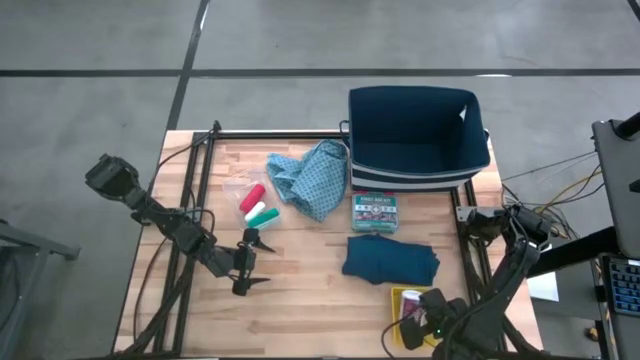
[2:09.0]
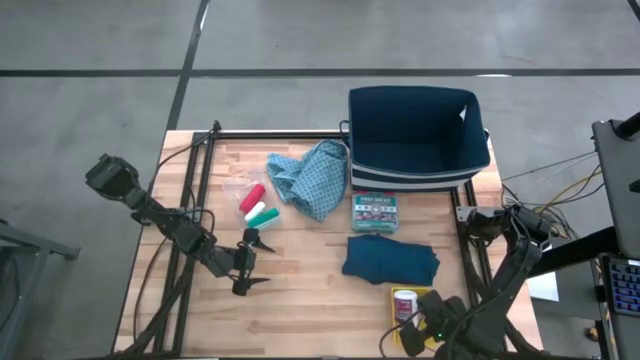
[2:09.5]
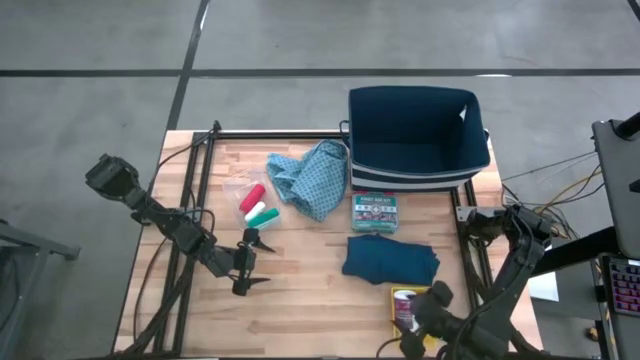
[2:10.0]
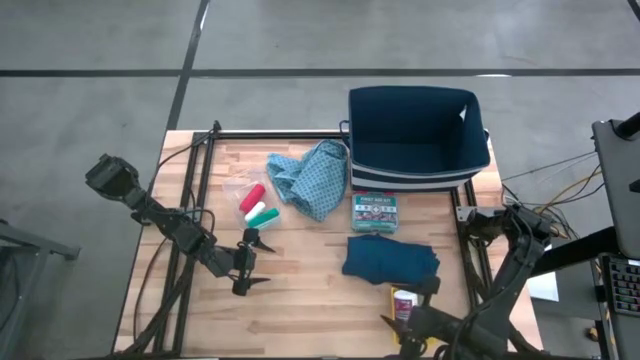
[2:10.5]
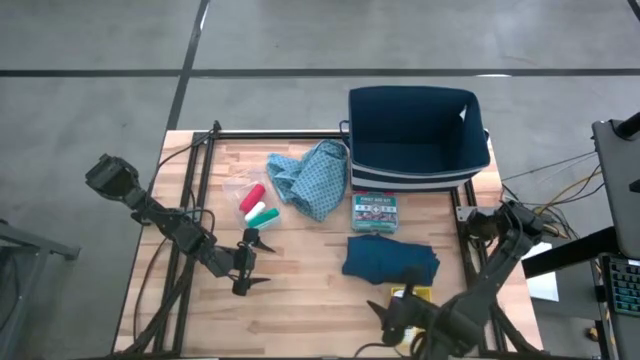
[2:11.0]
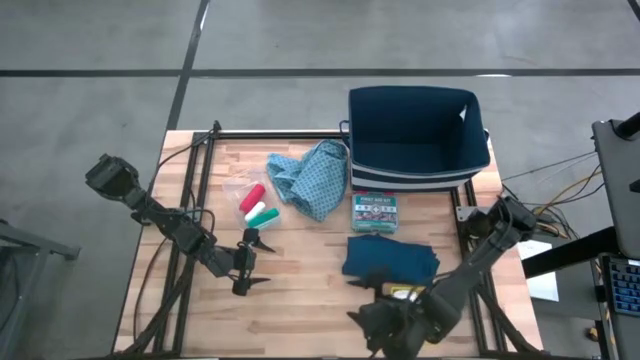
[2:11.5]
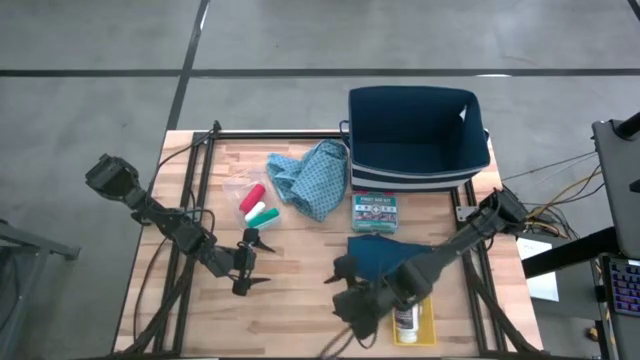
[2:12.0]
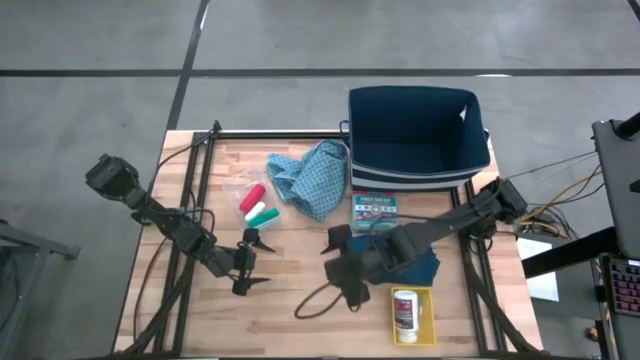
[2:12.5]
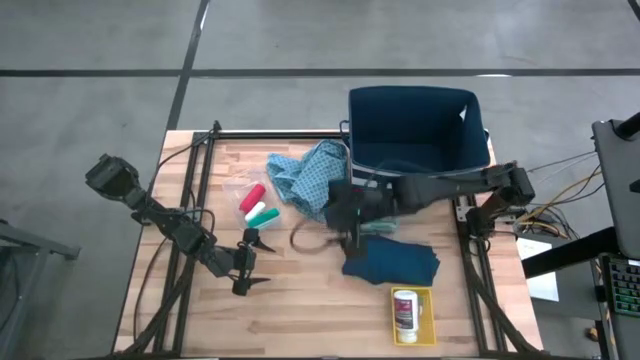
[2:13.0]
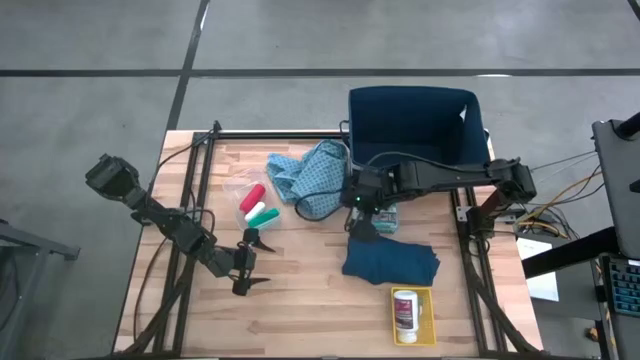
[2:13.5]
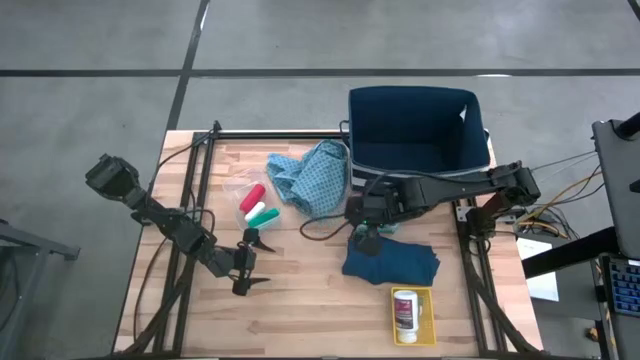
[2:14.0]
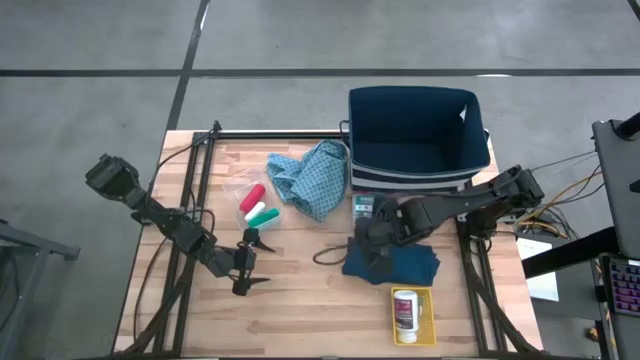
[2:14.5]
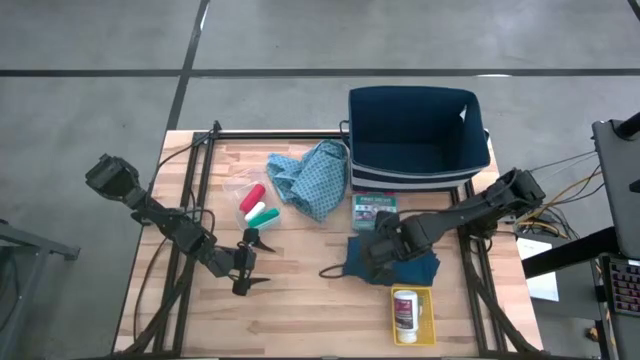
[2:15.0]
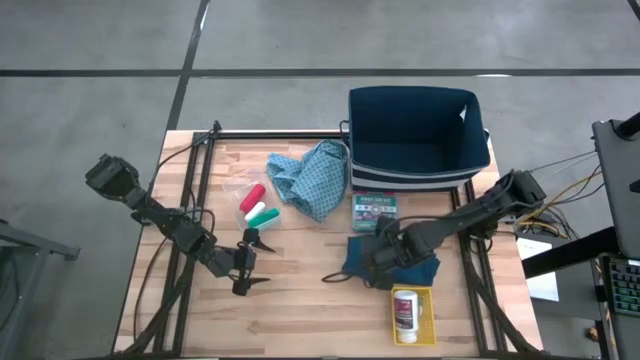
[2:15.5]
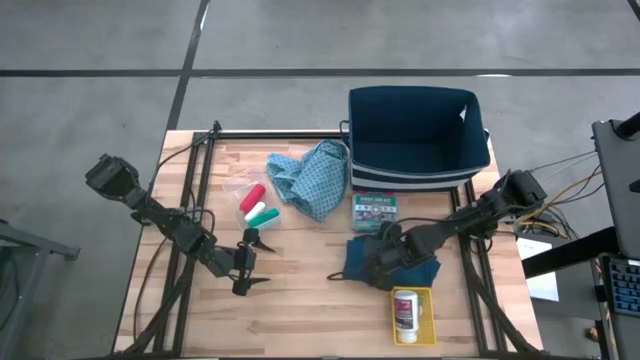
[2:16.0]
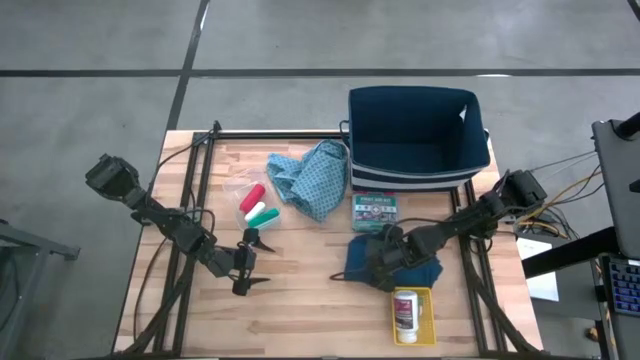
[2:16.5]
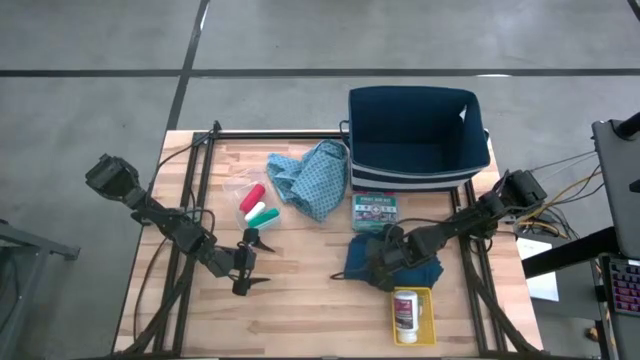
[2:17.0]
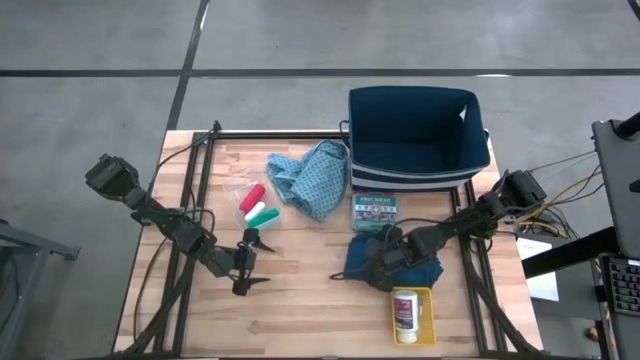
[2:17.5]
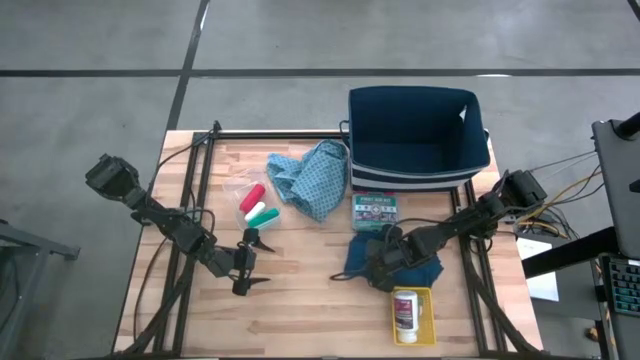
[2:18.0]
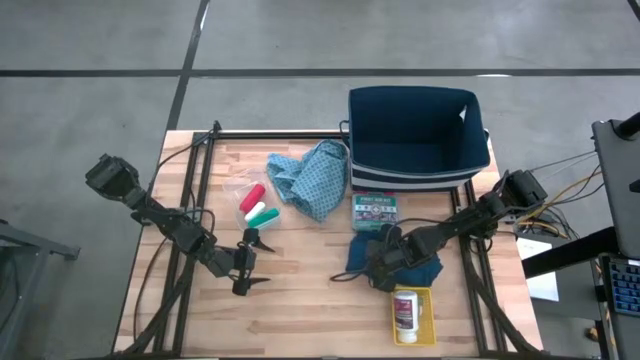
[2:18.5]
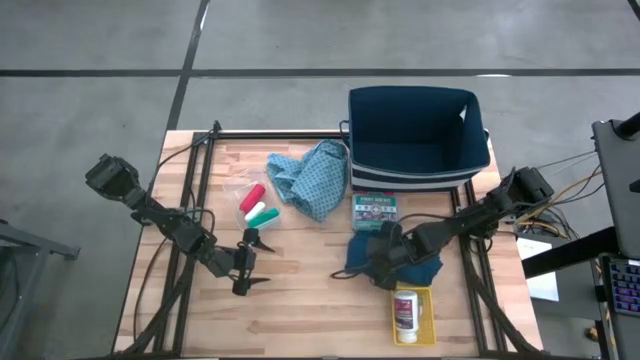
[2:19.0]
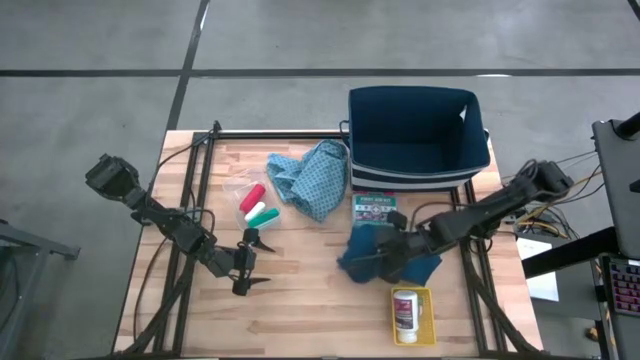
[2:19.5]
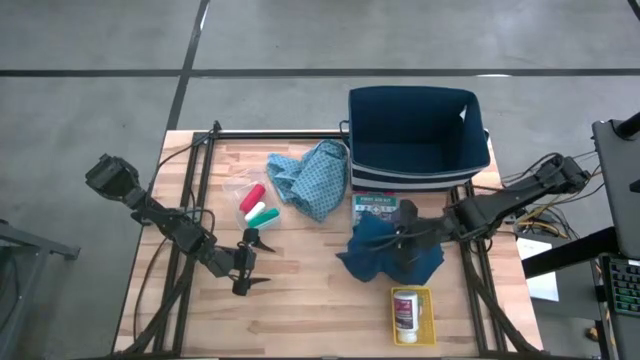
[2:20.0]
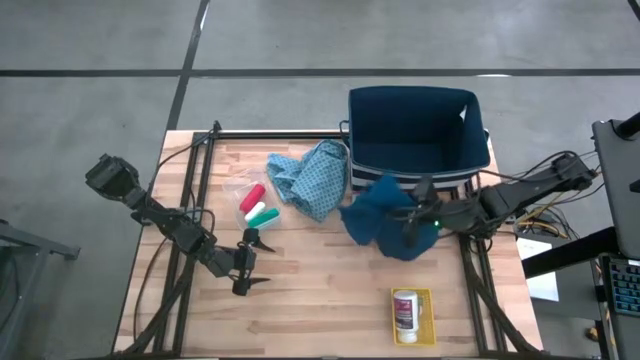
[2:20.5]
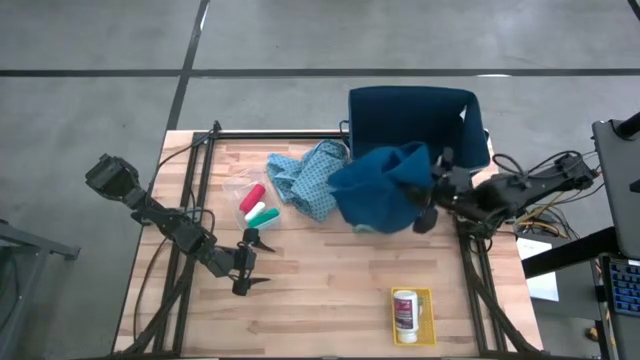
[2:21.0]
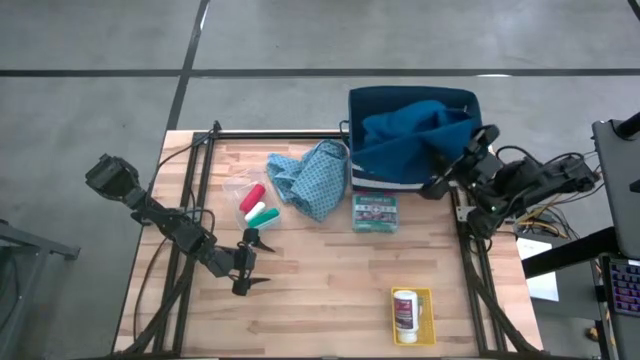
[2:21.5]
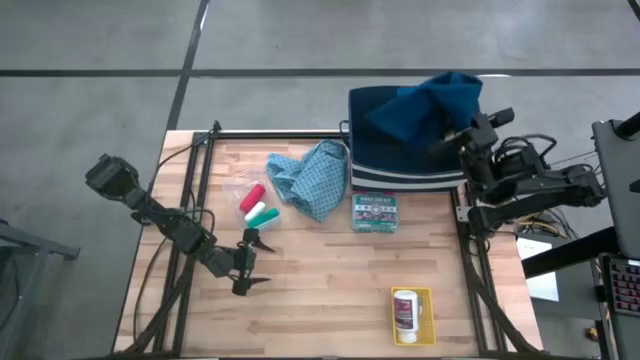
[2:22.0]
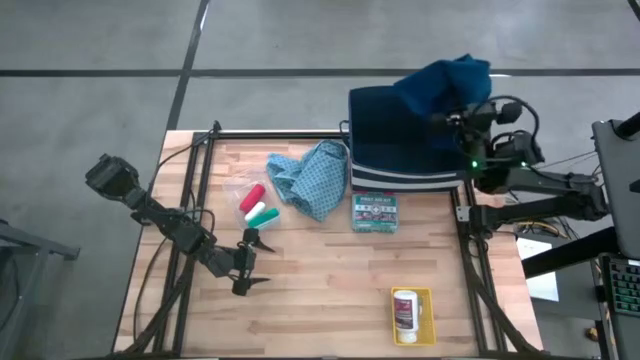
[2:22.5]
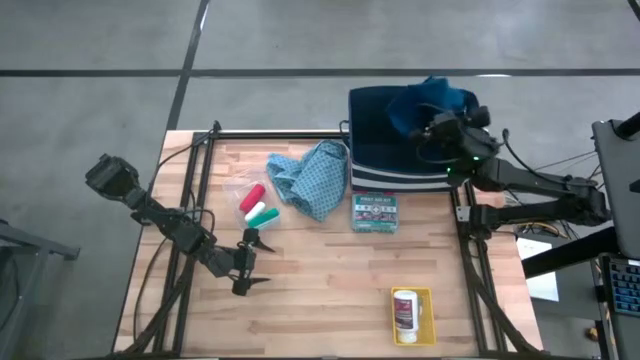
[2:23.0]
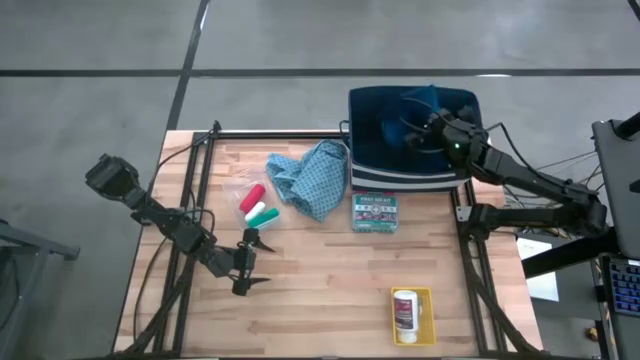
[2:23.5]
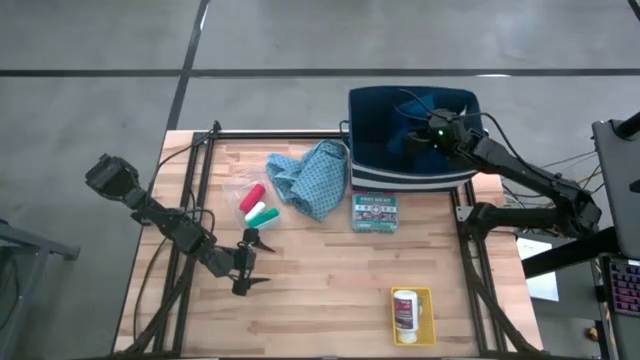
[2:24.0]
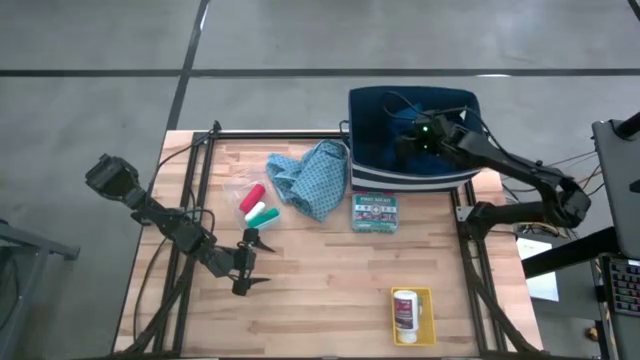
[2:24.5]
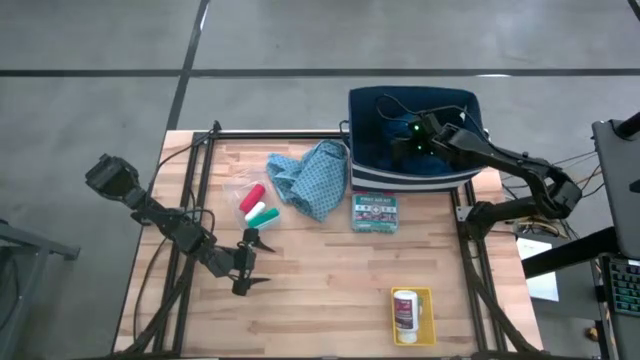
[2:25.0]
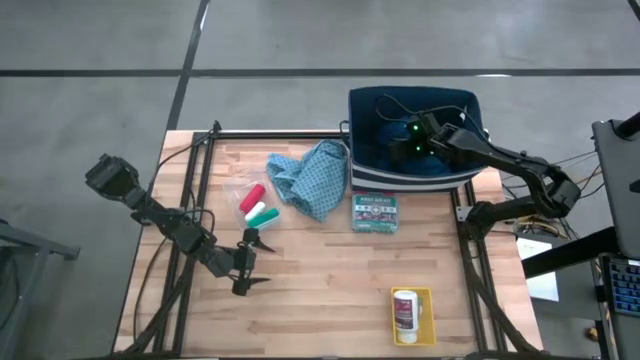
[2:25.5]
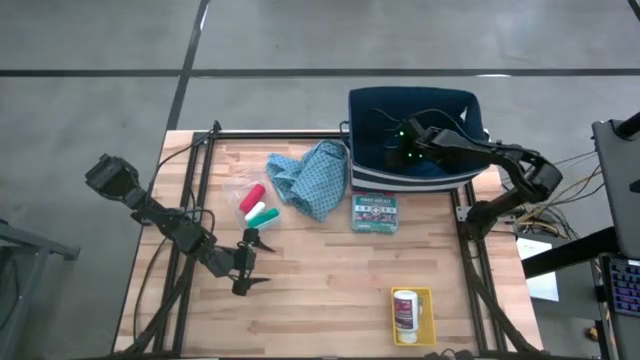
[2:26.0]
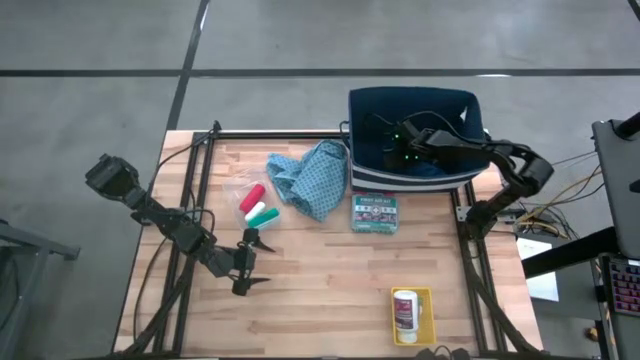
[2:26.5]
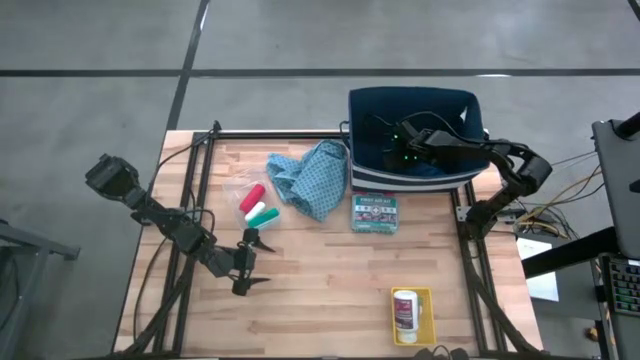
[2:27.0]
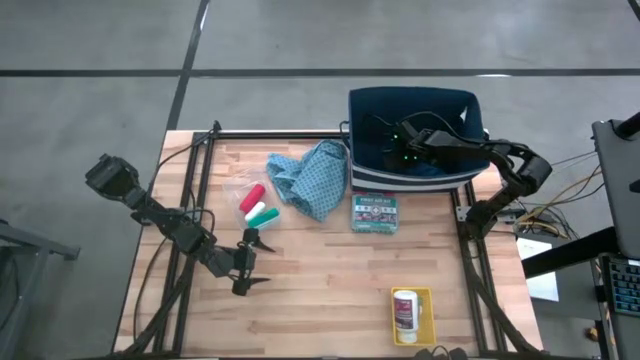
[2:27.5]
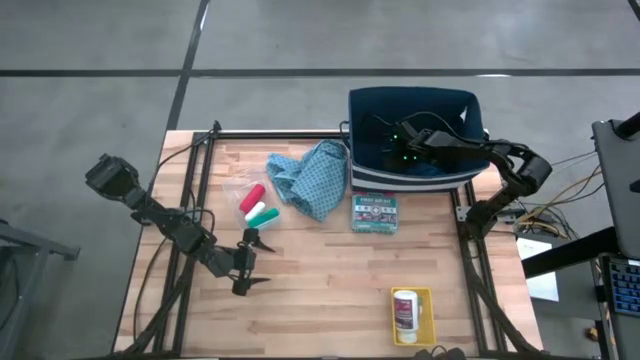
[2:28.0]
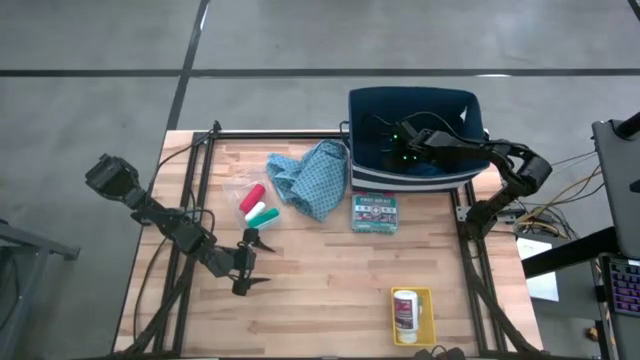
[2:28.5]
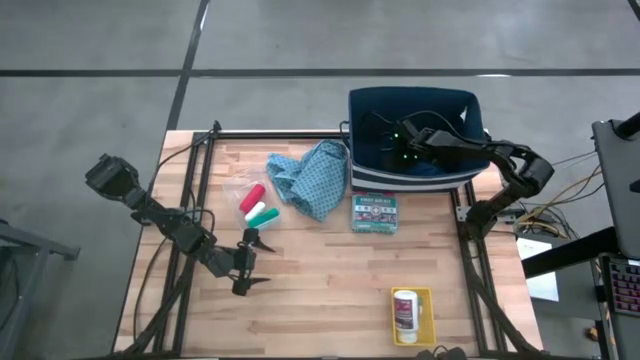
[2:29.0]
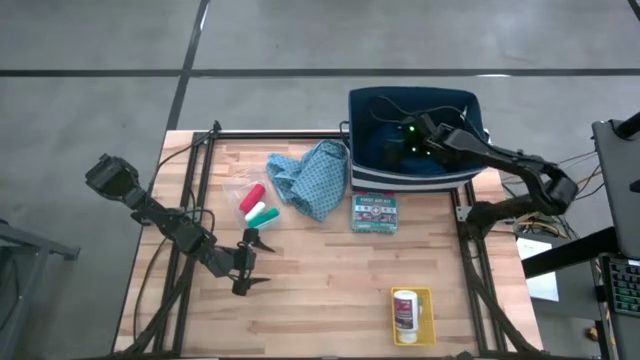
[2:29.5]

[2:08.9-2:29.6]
Task: Pick & place medical supplies in basket/bin
Put the blue patient gown into the blue bin
